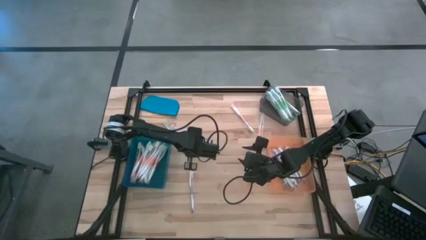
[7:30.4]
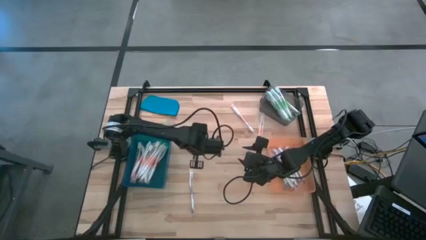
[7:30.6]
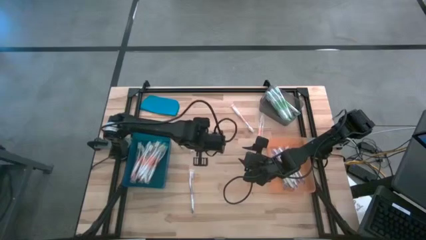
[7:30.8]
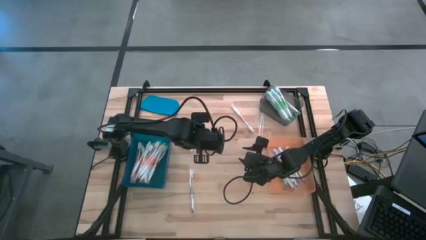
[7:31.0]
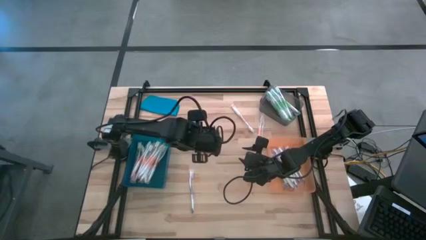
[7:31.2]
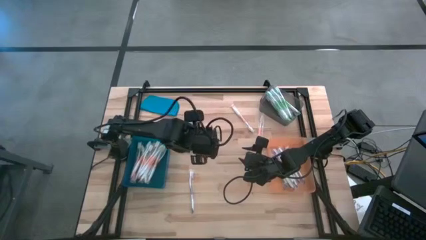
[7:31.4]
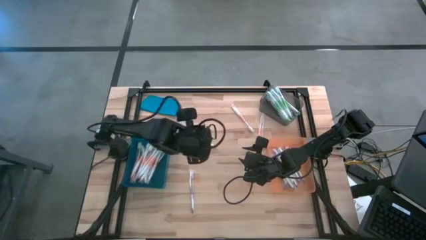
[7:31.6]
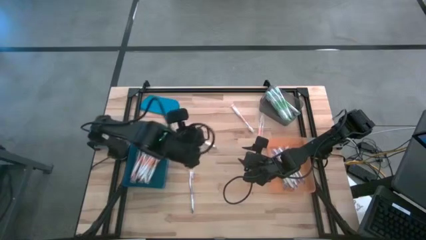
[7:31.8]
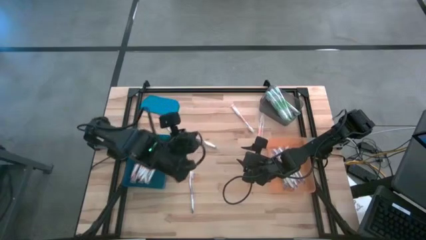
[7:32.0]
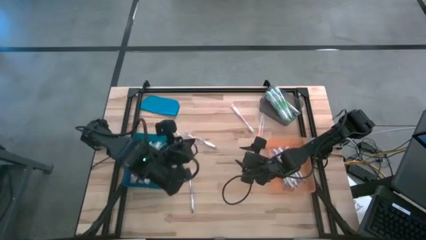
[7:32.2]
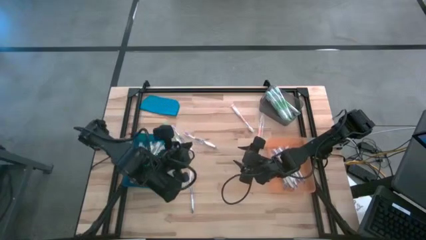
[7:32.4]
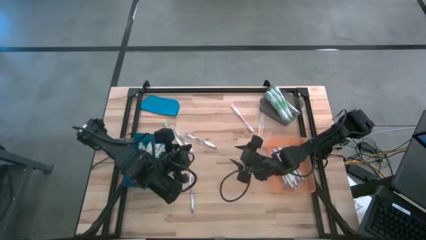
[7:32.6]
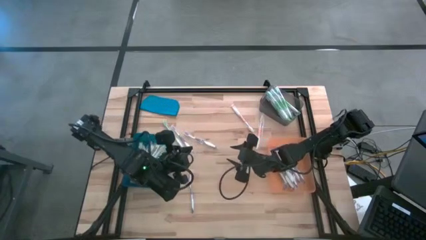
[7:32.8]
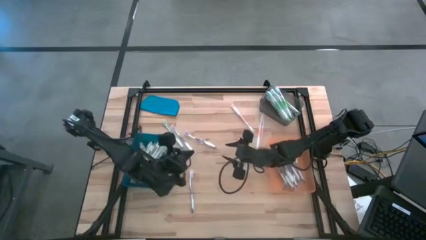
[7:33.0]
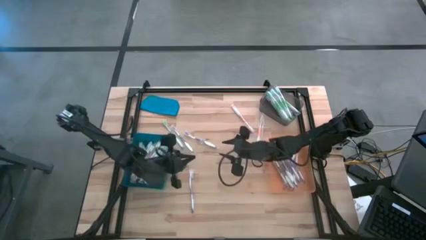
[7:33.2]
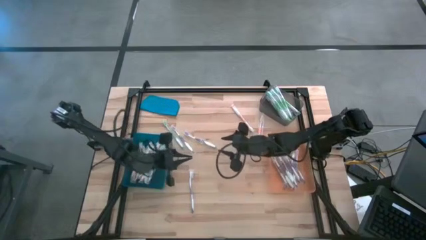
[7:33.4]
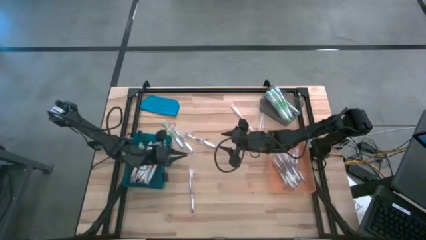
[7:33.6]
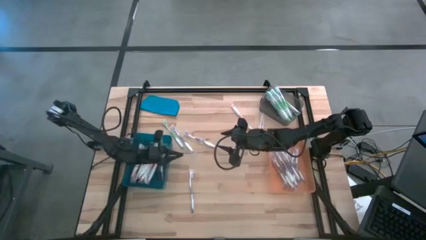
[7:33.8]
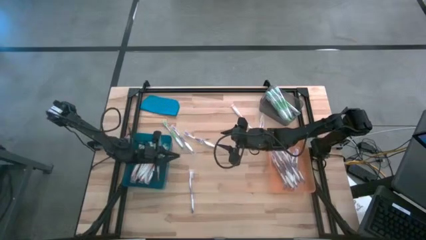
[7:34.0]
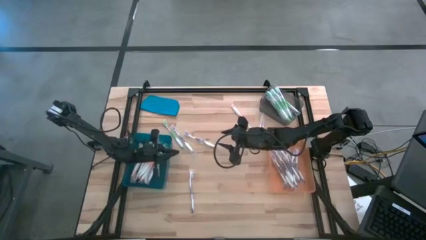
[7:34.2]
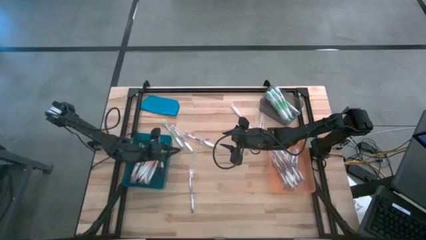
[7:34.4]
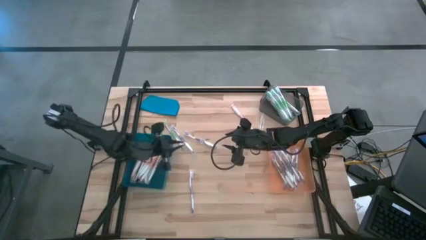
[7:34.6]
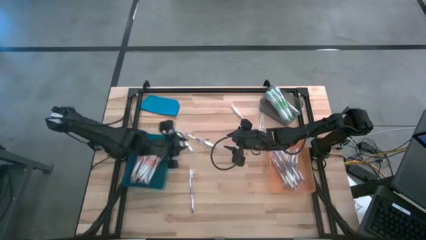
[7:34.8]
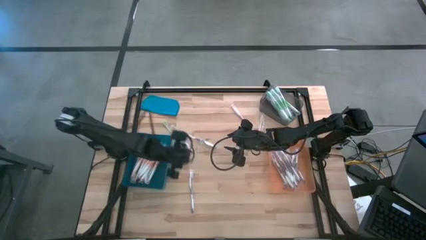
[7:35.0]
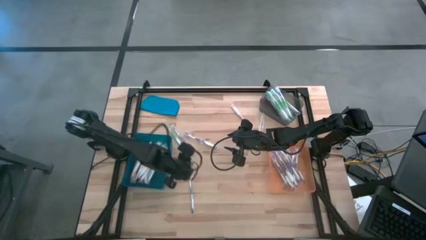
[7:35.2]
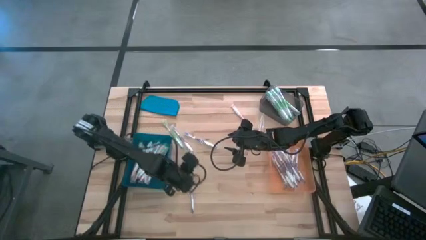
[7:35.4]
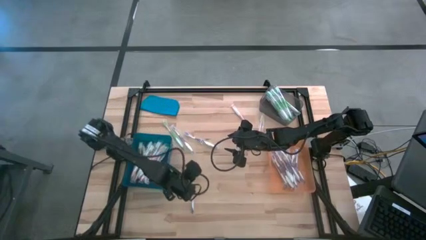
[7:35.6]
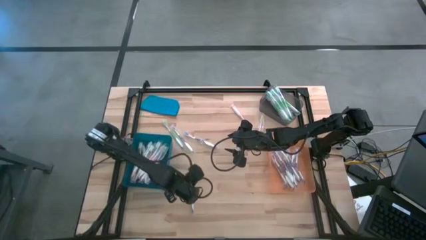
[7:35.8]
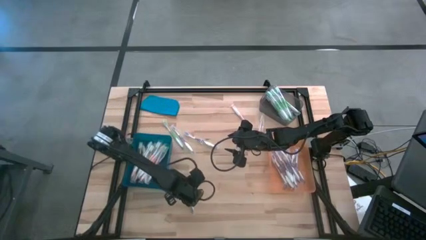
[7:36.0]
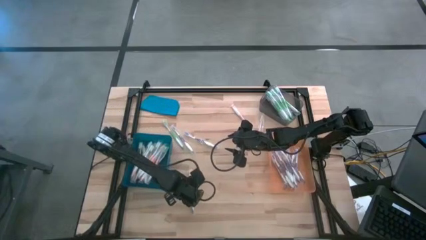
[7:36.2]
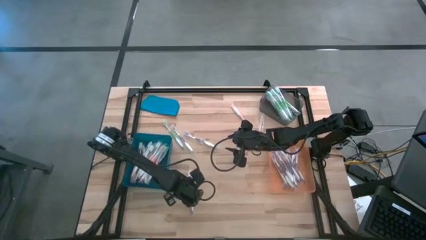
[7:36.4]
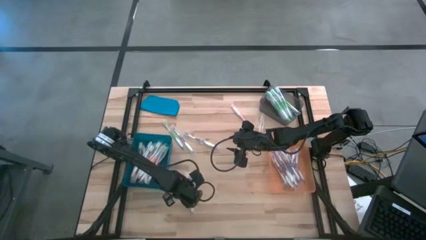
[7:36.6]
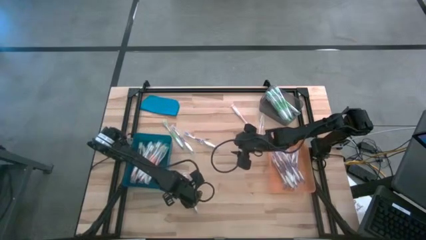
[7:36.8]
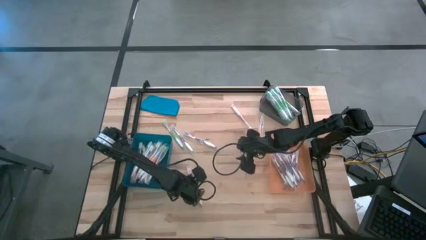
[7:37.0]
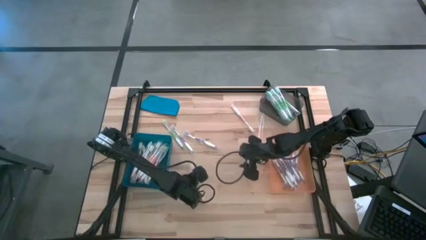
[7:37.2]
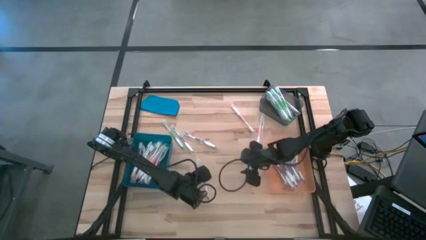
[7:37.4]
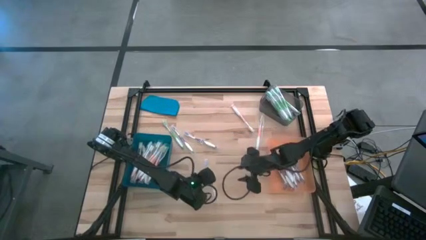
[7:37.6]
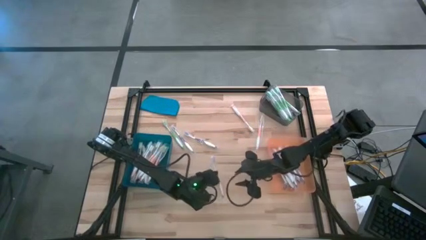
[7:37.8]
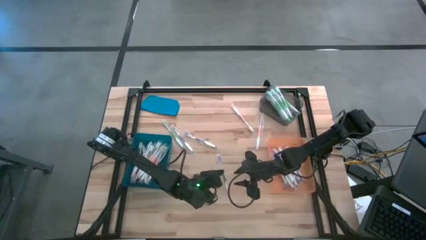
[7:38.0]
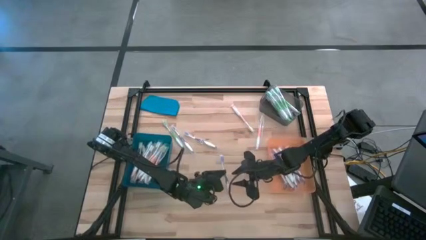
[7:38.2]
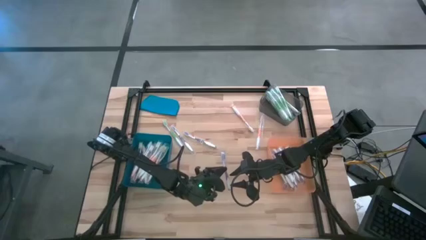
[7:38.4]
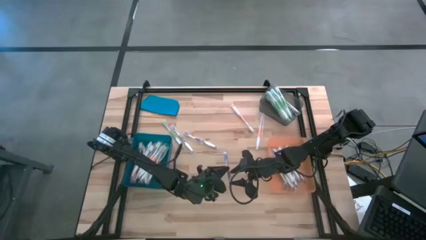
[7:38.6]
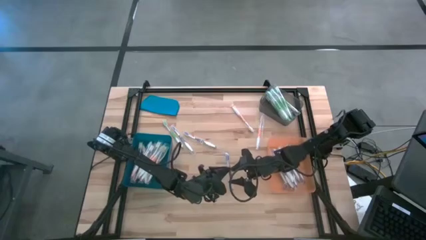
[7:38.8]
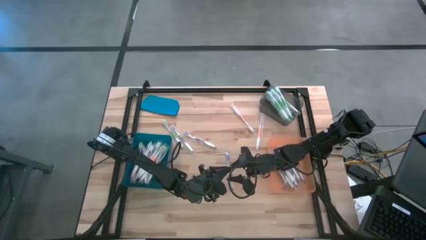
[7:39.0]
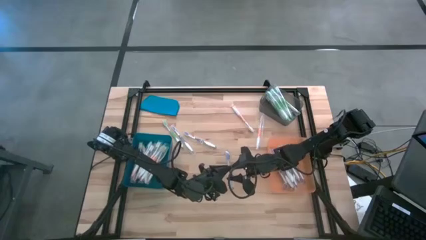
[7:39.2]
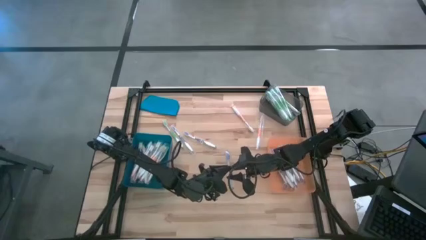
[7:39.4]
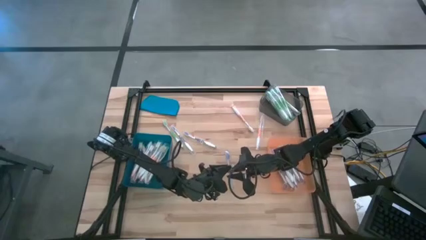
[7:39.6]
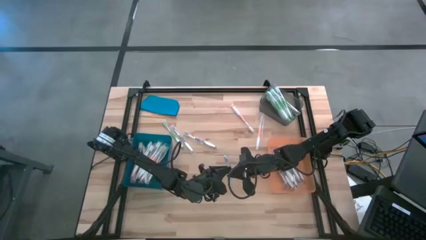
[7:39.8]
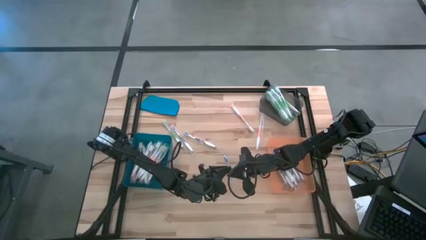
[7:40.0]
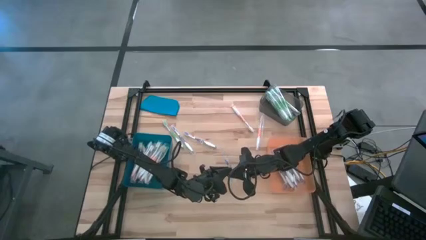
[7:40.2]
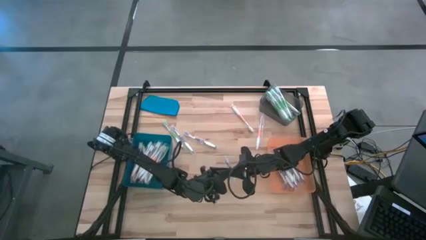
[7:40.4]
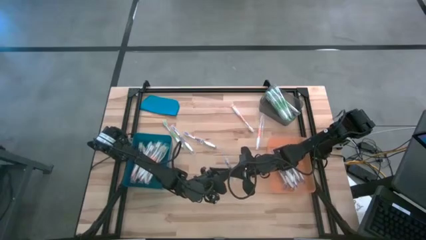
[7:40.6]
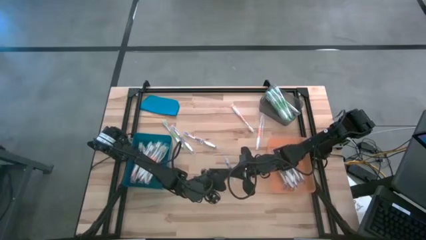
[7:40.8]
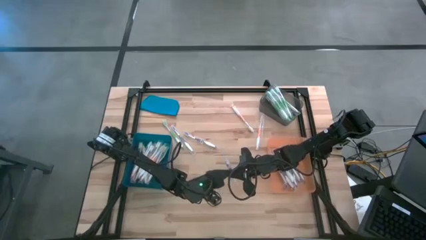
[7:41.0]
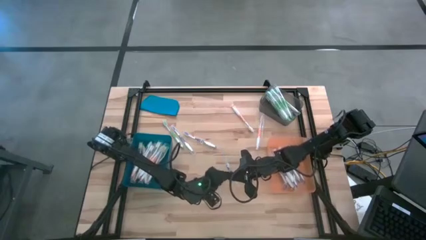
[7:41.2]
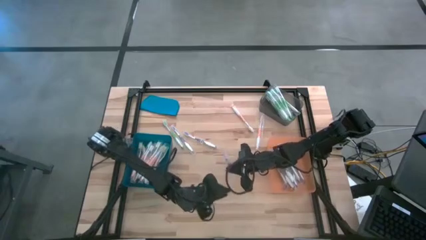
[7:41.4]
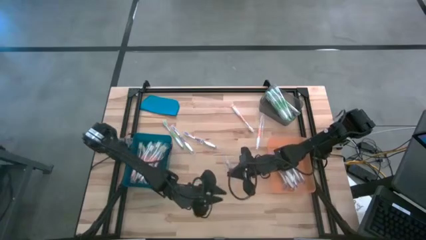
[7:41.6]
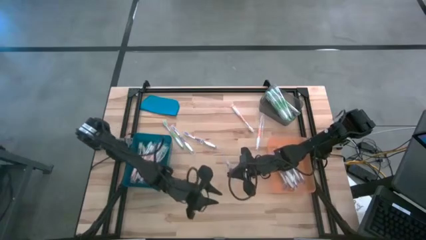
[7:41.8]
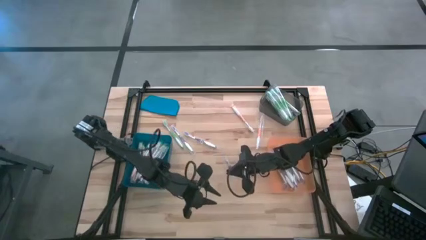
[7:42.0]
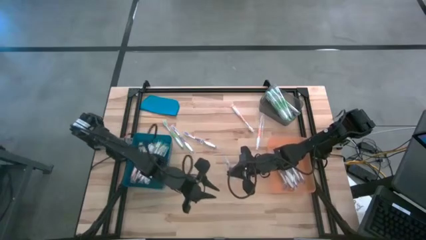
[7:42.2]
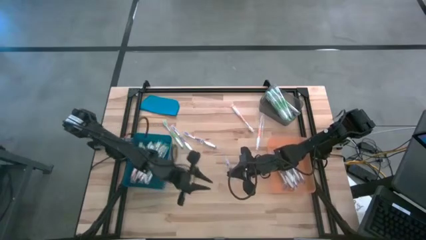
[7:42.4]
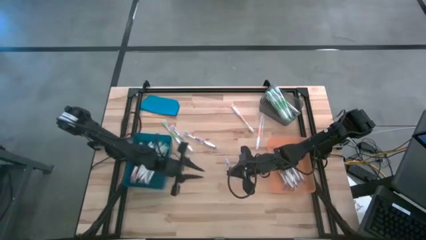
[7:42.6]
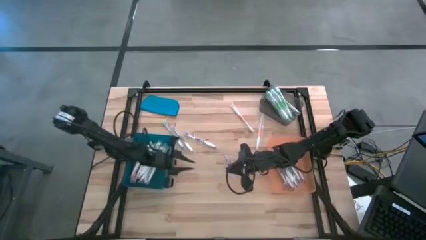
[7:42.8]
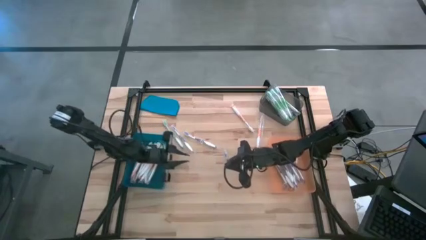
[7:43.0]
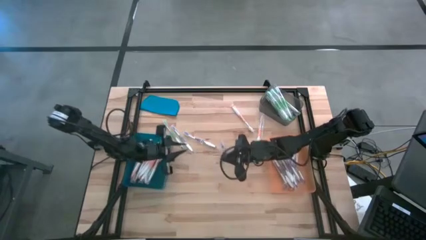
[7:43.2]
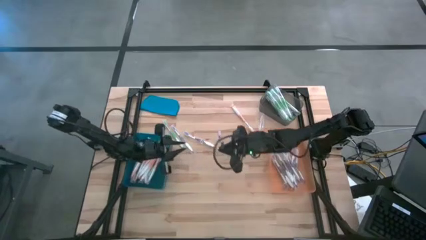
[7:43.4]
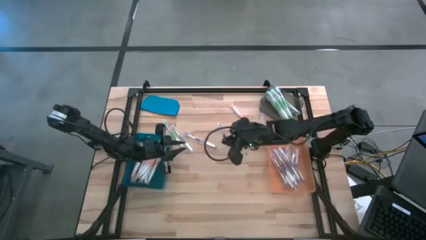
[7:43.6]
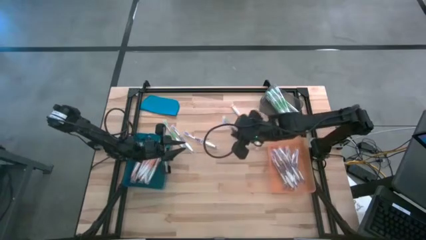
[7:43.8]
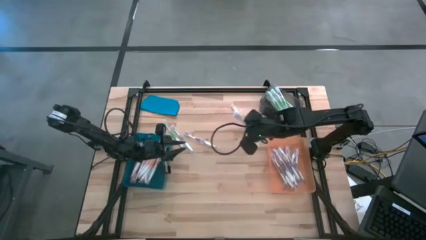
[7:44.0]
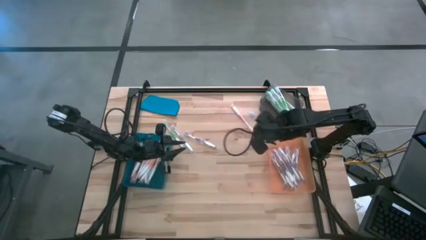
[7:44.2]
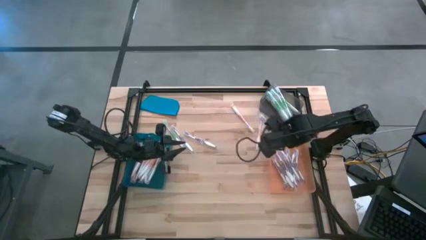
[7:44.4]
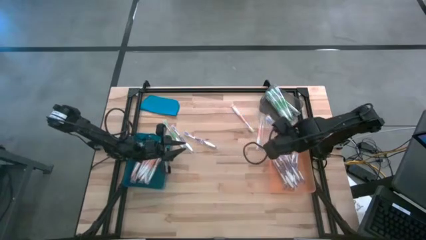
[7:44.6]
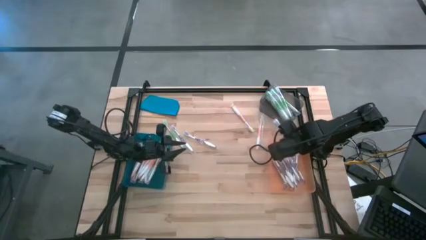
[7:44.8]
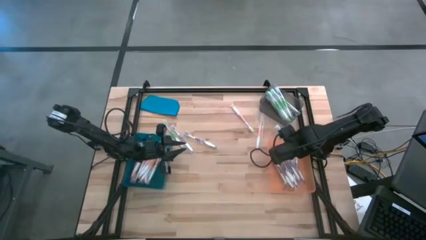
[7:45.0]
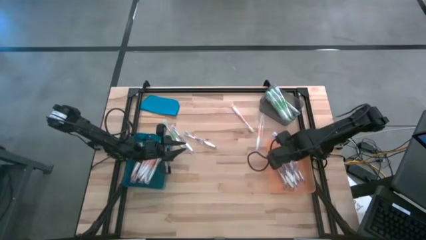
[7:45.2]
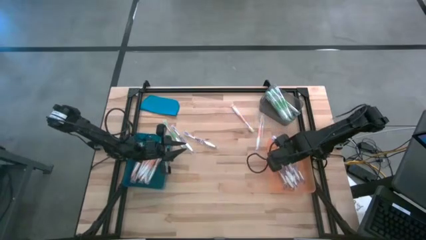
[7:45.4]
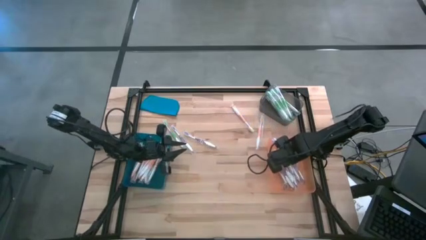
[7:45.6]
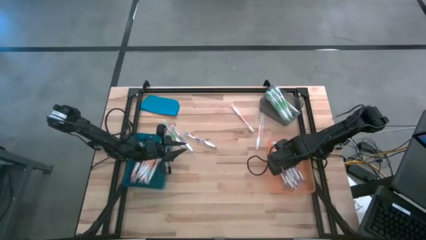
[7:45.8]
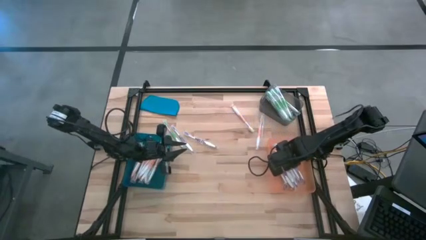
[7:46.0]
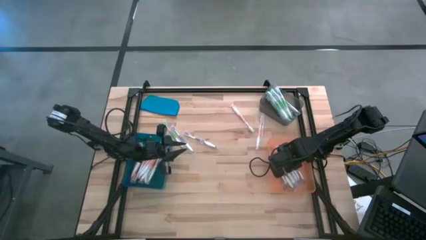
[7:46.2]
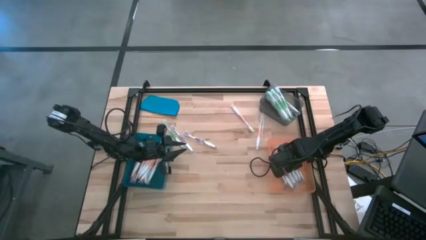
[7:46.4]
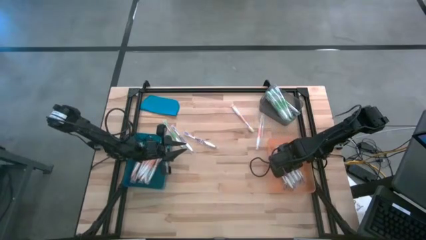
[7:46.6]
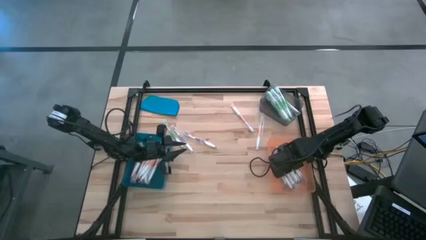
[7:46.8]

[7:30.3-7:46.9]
Task: Pick & Place Toothbrushes
Put the purple toothbrush into the orange bin
